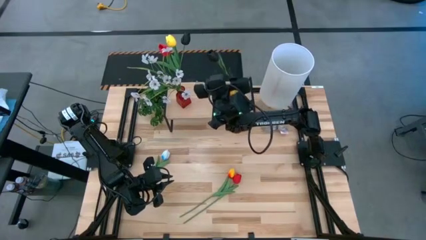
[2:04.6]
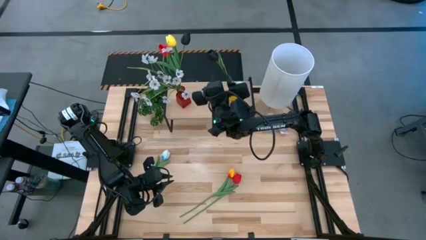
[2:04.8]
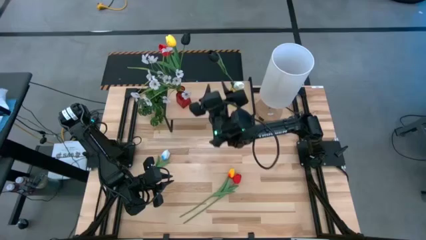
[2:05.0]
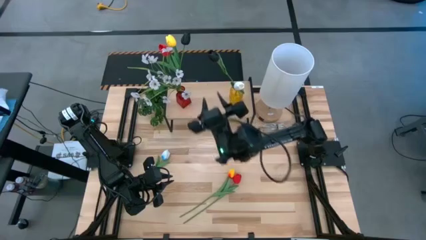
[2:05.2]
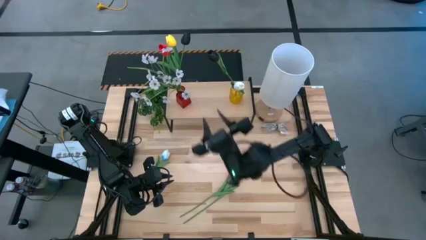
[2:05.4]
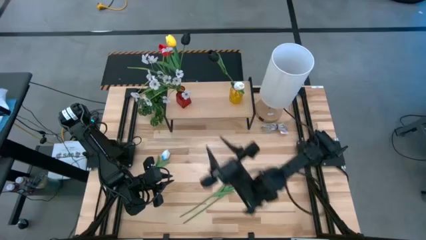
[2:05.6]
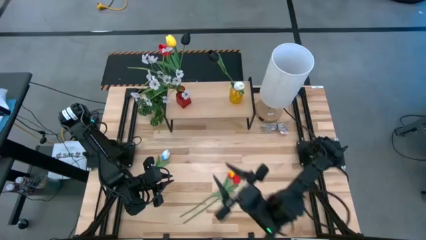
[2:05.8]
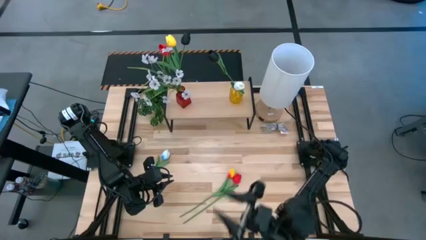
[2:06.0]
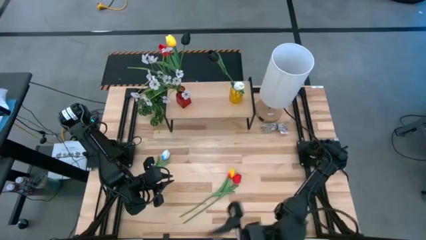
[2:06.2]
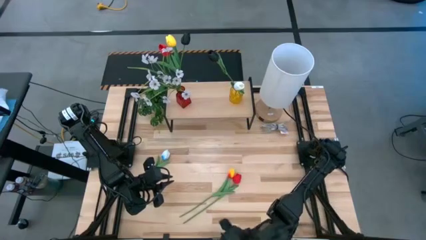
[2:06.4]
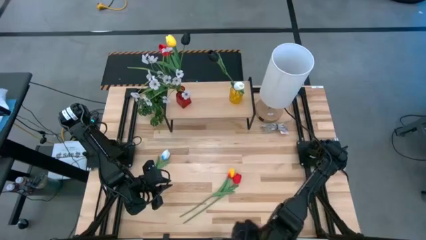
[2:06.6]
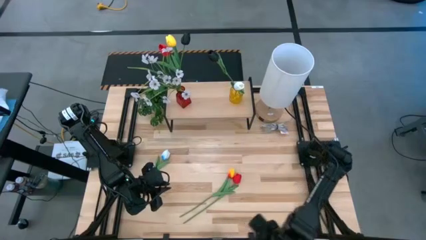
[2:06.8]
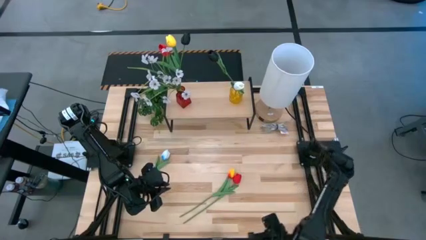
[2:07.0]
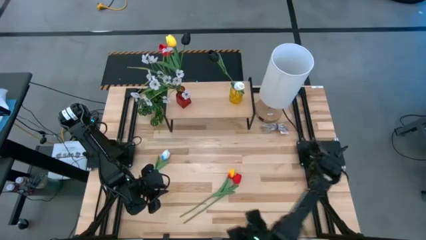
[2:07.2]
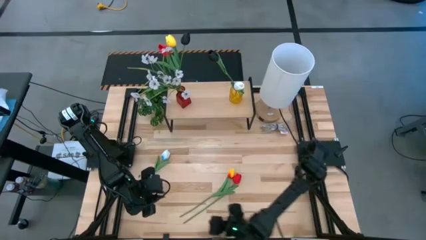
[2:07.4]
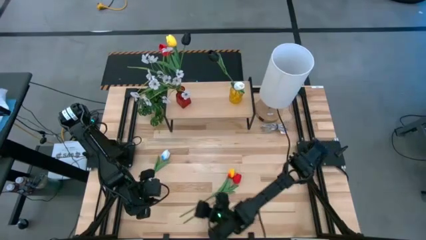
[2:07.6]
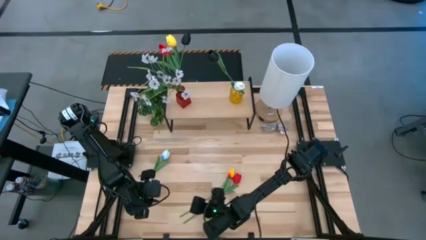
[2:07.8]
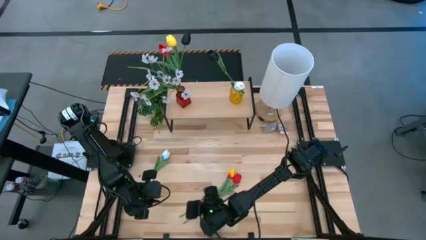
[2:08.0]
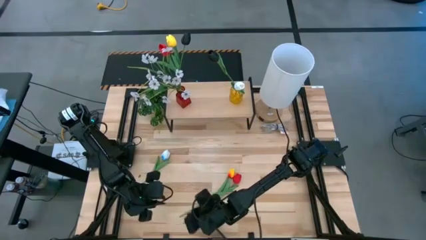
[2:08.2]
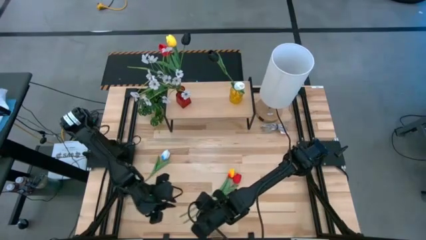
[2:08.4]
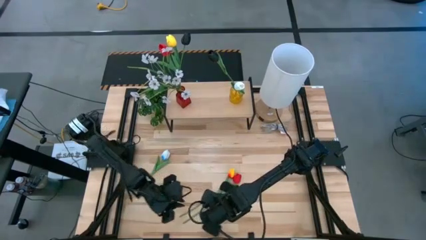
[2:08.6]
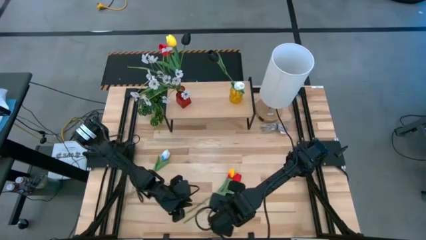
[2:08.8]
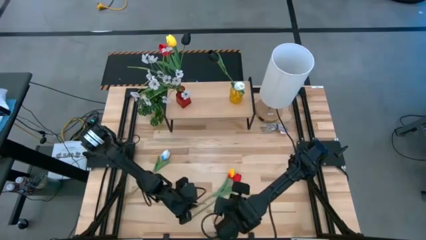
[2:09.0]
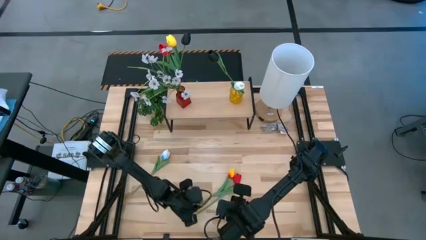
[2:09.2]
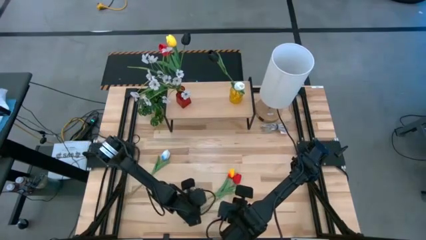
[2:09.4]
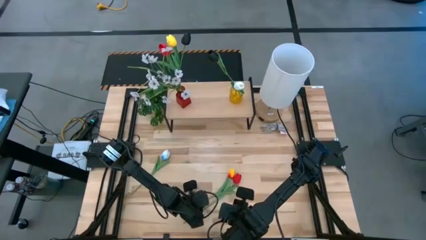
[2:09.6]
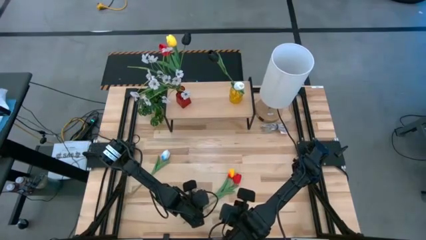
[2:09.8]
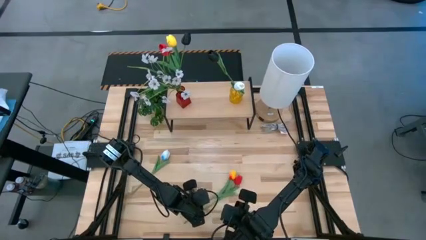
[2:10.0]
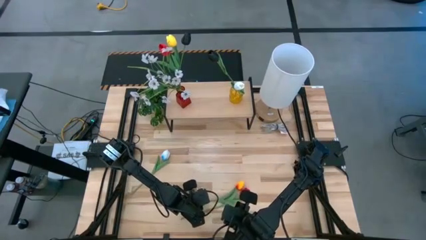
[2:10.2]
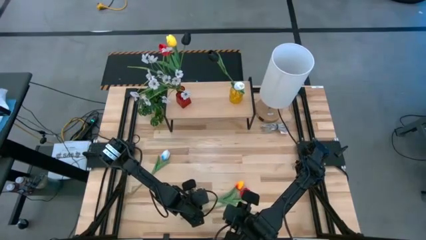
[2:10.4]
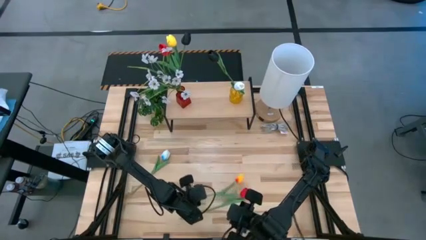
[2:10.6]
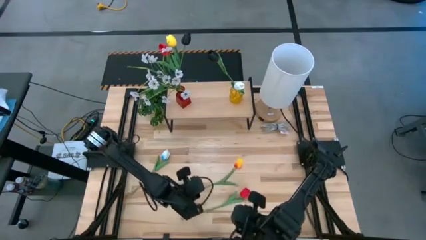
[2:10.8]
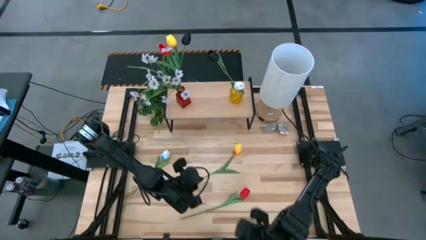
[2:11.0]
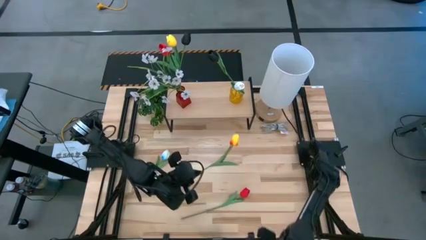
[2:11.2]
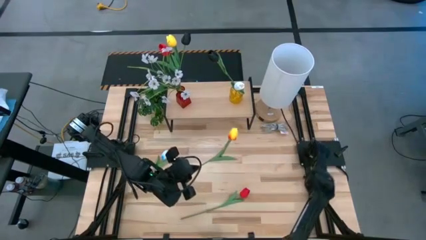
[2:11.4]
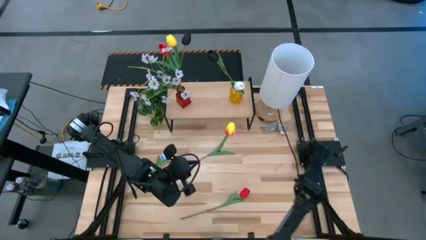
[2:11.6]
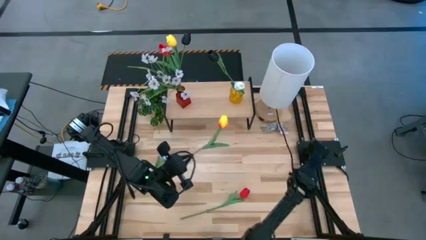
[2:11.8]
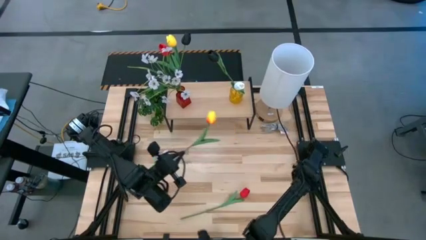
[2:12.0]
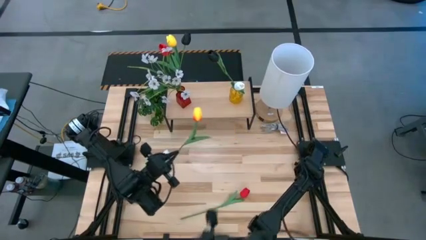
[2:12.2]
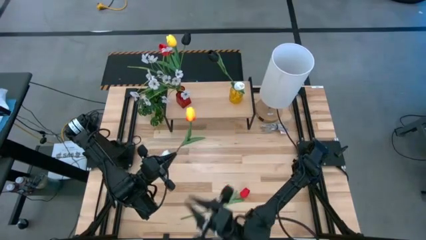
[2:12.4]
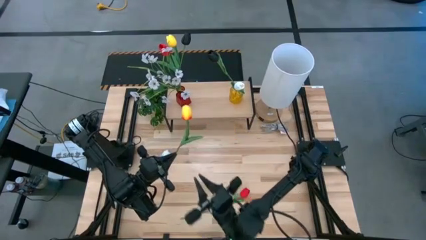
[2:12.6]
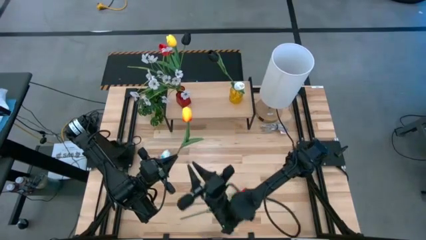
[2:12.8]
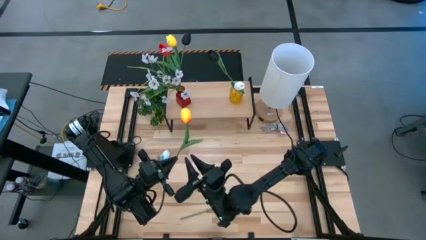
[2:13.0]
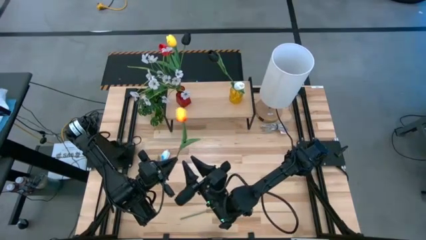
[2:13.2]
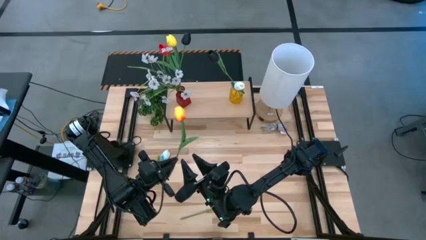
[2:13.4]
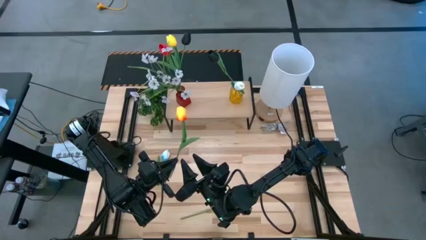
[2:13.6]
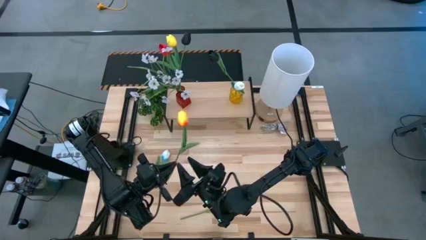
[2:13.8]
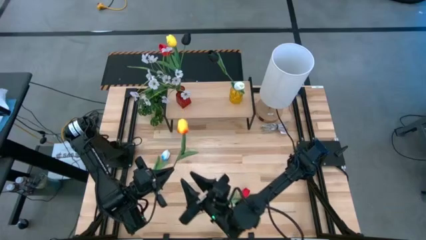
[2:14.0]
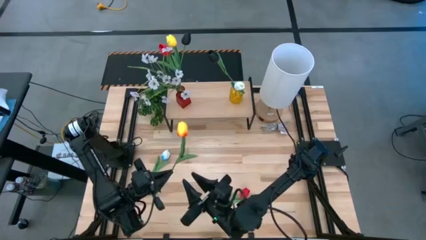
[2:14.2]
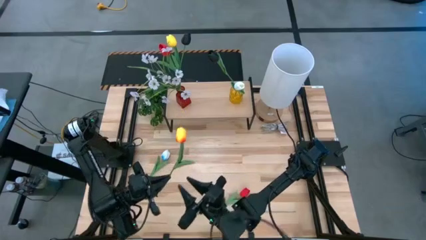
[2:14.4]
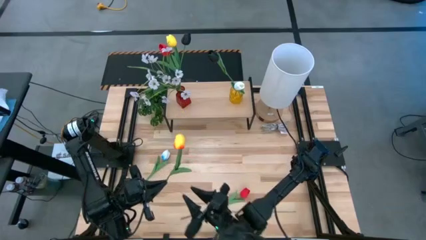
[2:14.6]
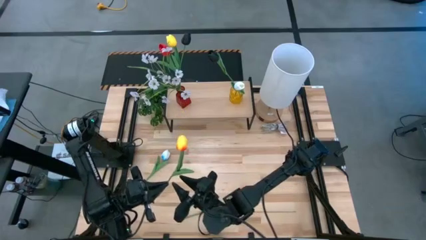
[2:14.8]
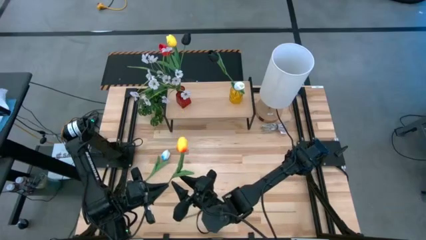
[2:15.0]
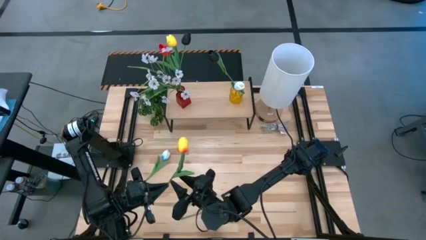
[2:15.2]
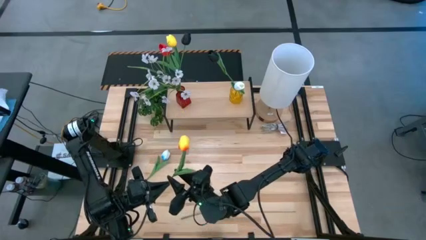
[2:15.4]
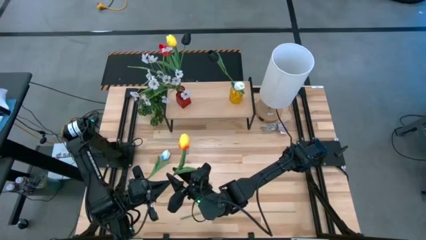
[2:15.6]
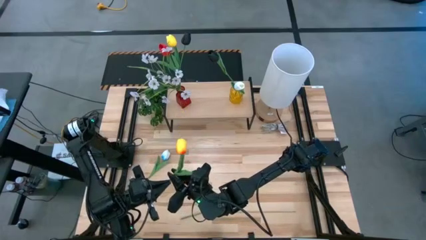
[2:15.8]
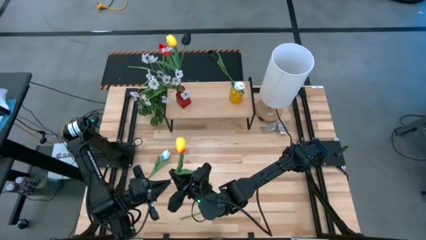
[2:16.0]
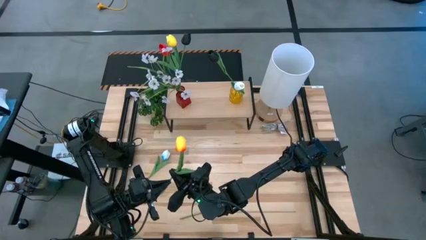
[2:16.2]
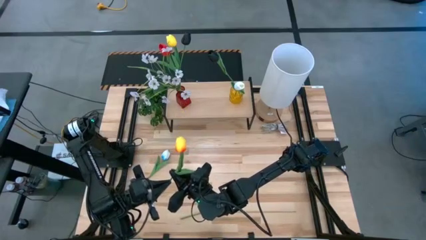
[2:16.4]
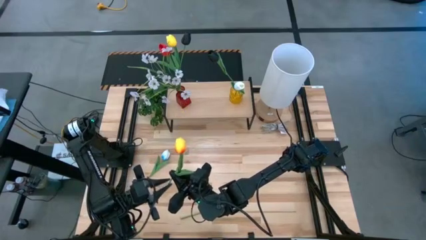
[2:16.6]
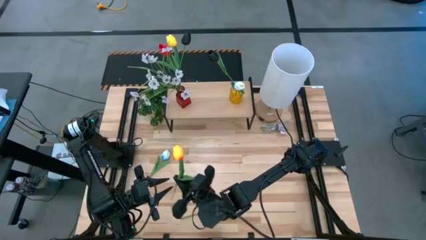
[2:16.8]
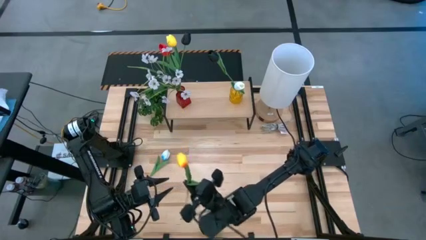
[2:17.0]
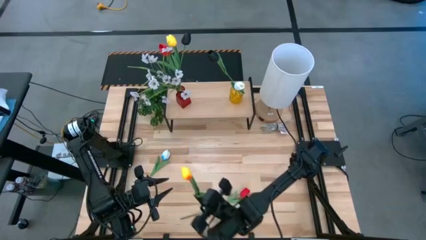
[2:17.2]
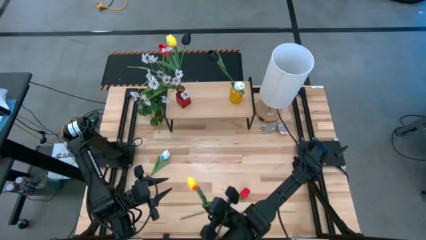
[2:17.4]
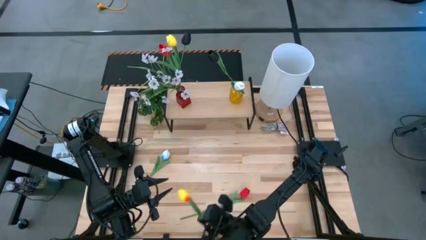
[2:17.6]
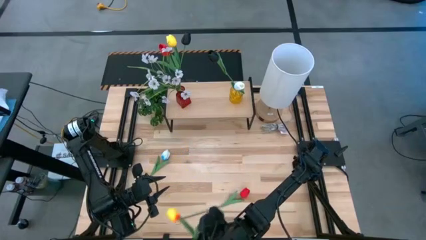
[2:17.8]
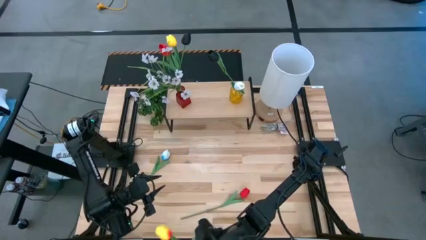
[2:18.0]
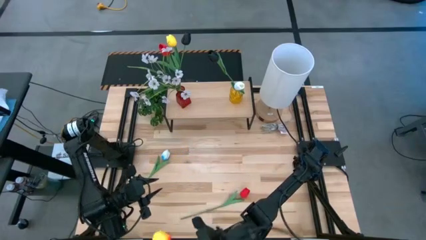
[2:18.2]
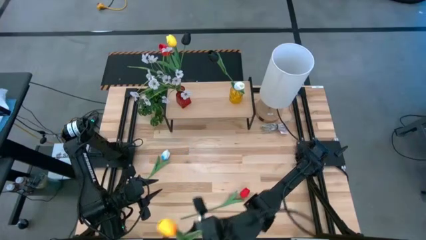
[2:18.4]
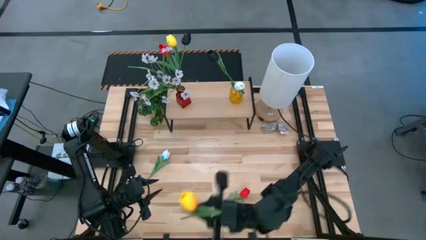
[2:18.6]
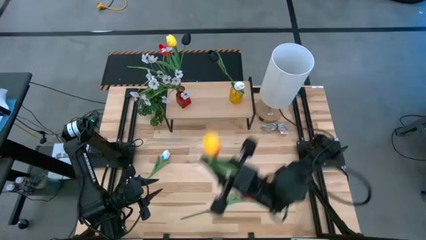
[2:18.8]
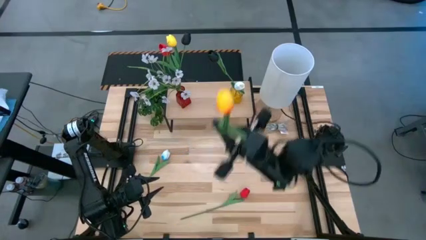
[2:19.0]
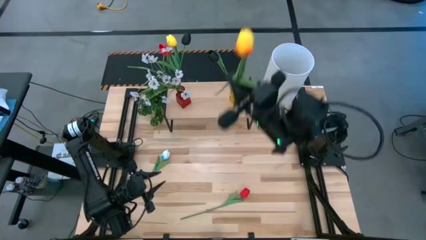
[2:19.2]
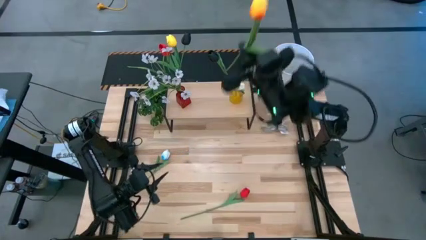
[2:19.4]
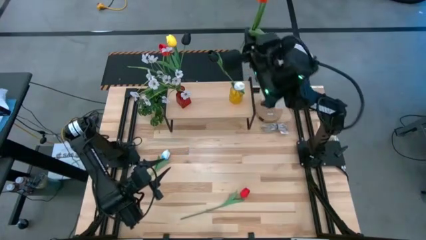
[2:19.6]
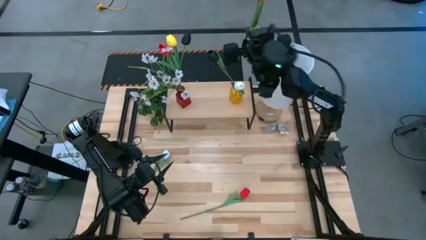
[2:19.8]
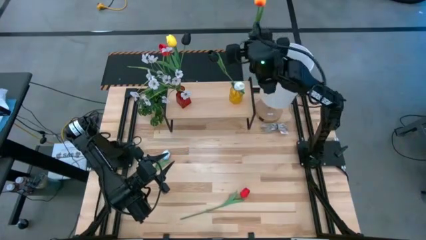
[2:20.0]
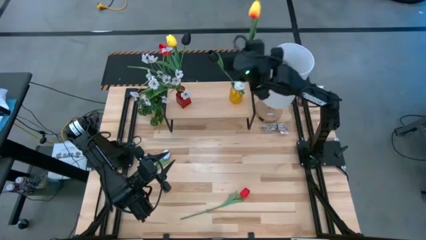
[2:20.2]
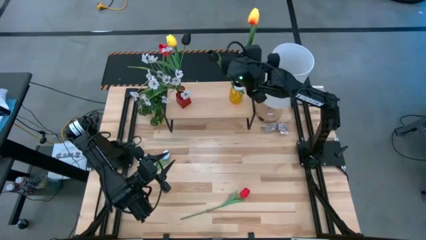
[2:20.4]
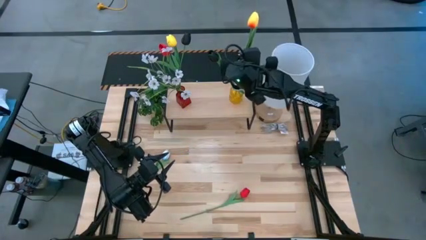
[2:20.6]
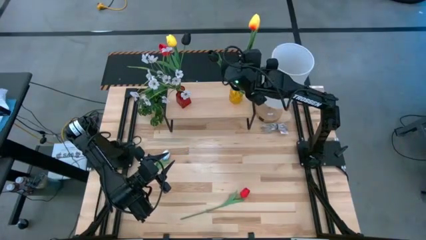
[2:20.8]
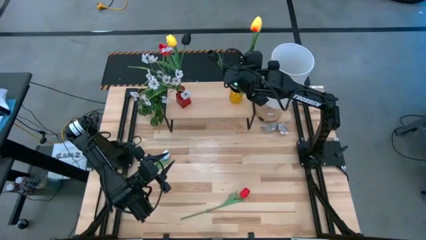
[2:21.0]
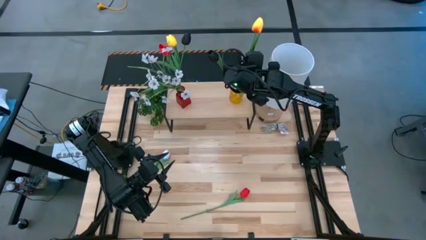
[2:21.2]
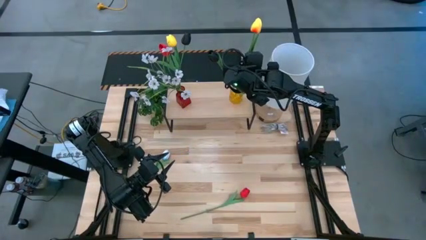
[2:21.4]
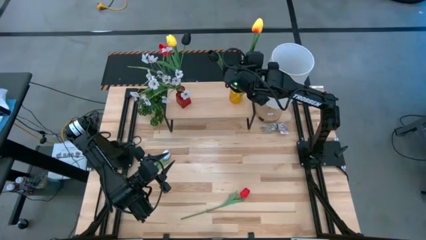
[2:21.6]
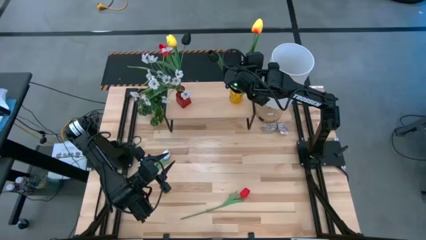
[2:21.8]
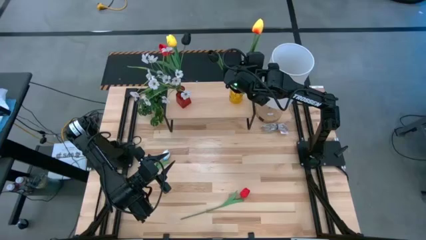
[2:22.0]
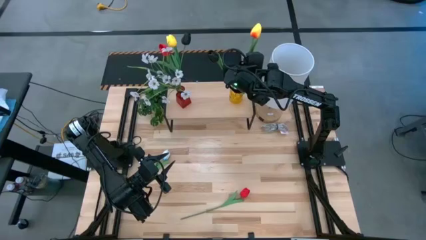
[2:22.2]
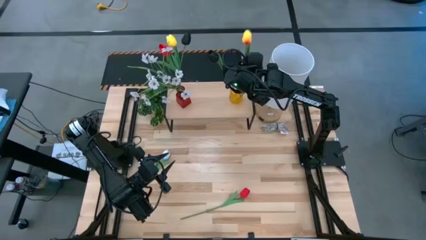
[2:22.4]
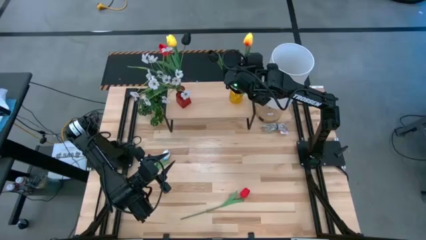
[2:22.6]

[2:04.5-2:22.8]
Task: Pick and place flowers into a vace then onto a shelf
Put the yellow flower into the yellow vase on the shelf
